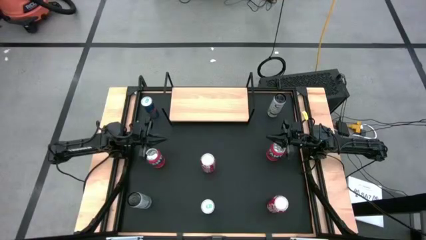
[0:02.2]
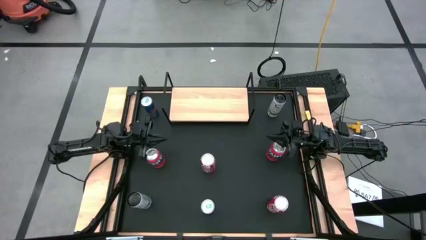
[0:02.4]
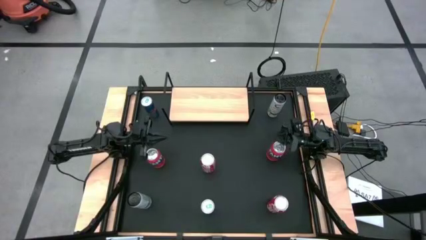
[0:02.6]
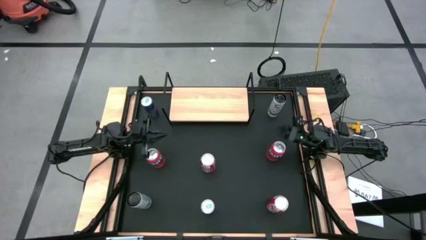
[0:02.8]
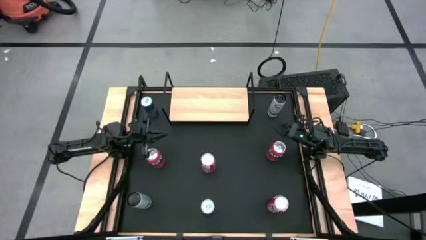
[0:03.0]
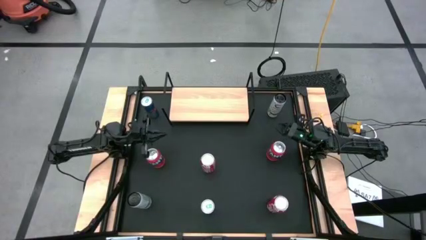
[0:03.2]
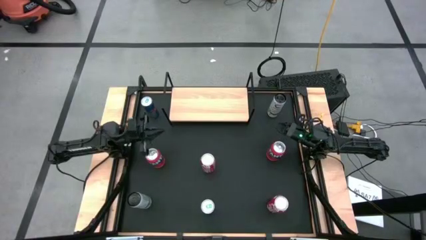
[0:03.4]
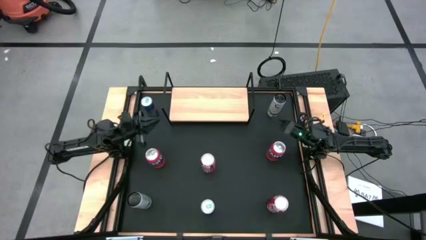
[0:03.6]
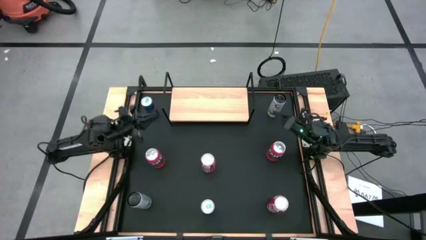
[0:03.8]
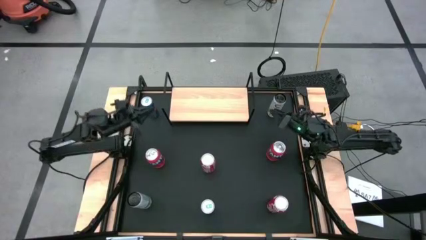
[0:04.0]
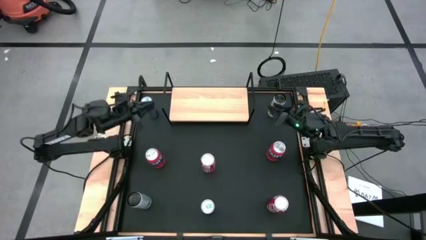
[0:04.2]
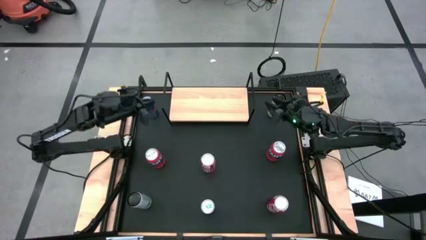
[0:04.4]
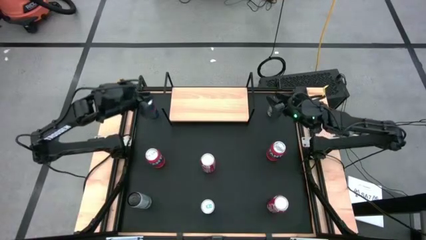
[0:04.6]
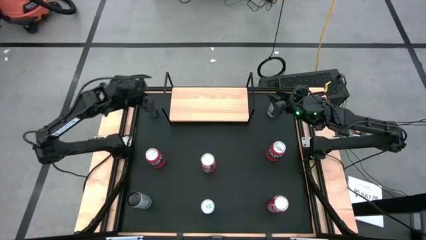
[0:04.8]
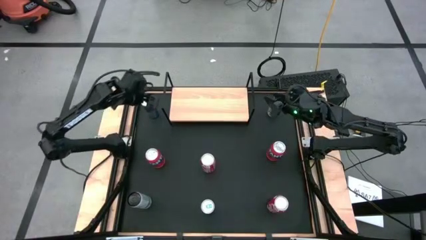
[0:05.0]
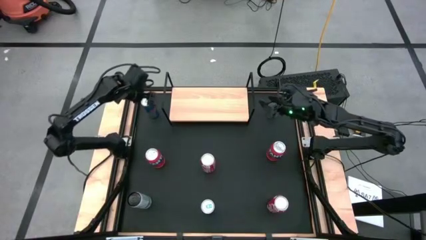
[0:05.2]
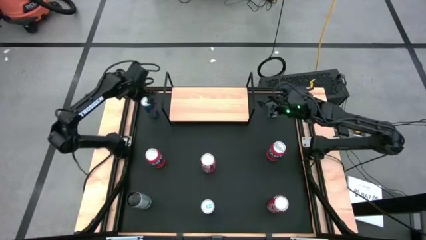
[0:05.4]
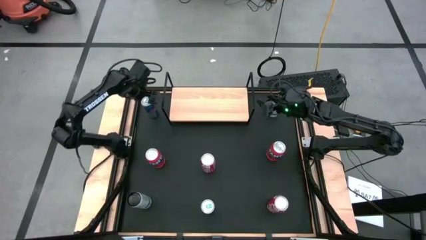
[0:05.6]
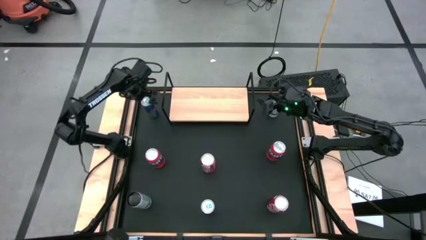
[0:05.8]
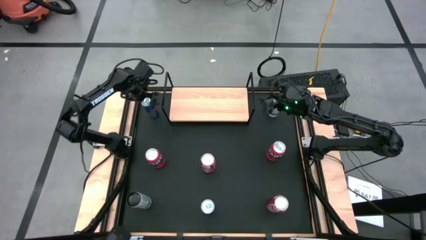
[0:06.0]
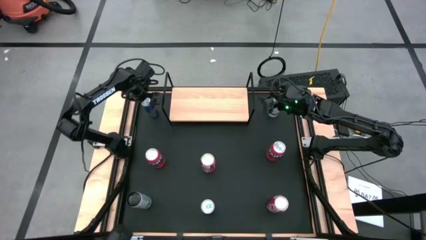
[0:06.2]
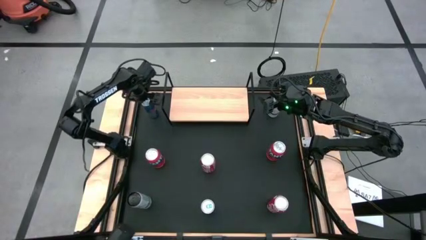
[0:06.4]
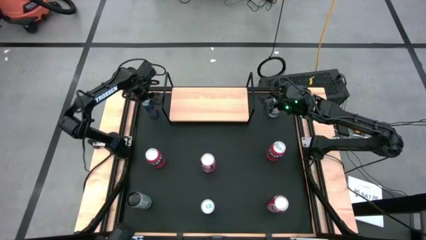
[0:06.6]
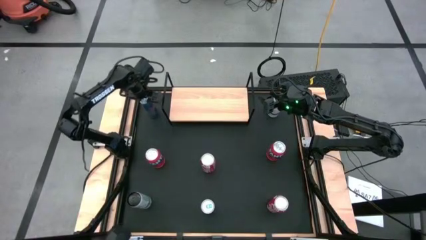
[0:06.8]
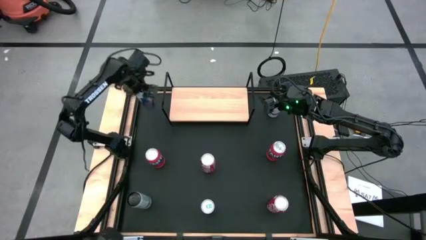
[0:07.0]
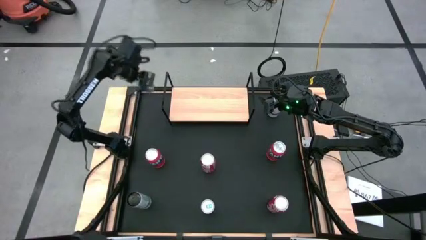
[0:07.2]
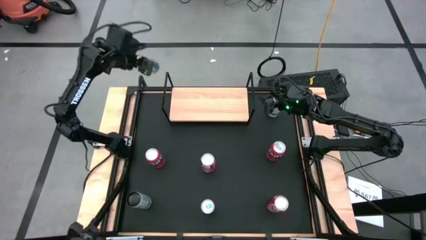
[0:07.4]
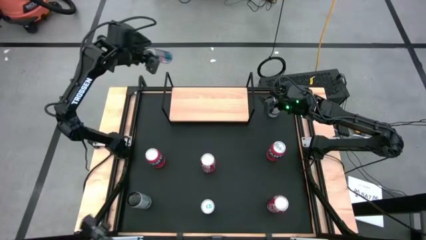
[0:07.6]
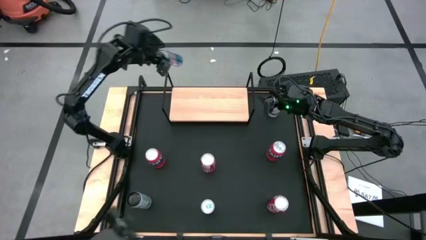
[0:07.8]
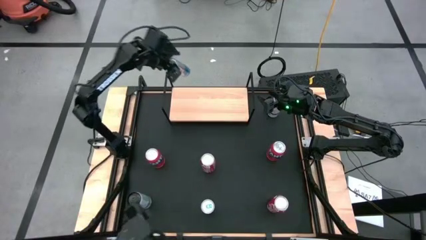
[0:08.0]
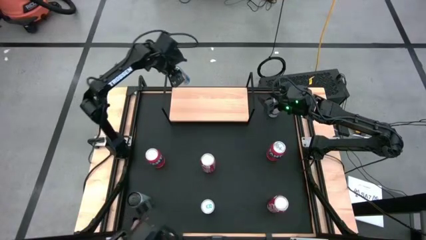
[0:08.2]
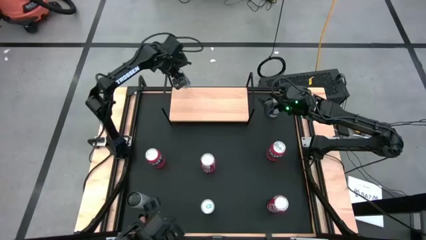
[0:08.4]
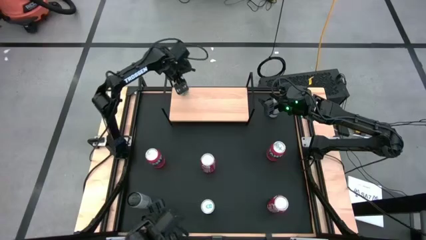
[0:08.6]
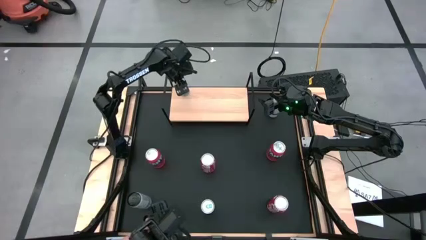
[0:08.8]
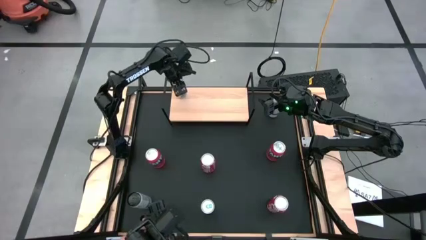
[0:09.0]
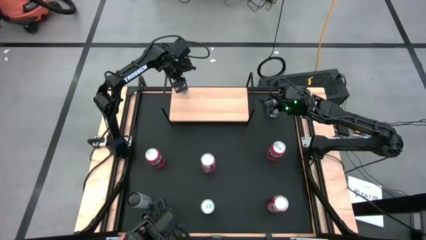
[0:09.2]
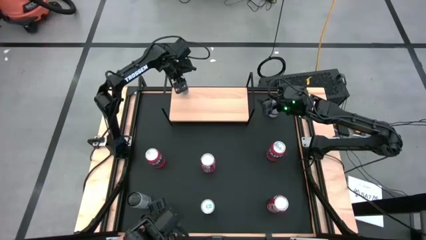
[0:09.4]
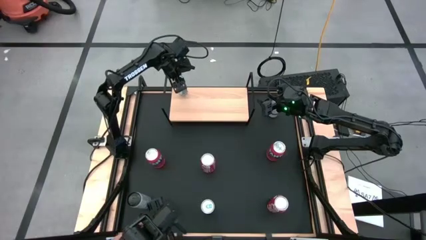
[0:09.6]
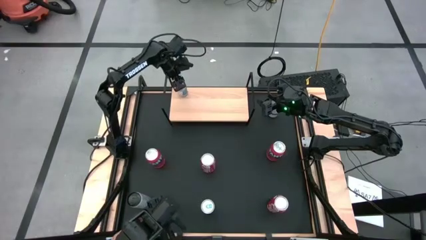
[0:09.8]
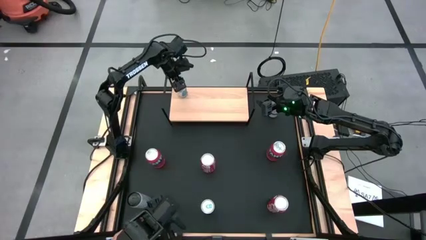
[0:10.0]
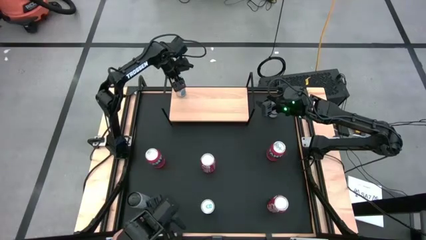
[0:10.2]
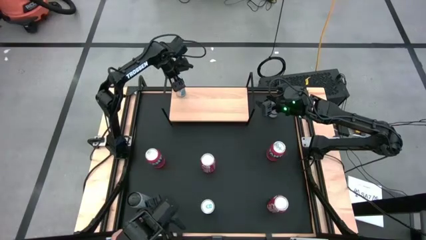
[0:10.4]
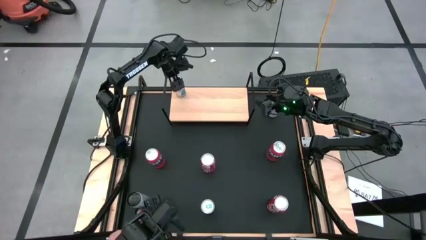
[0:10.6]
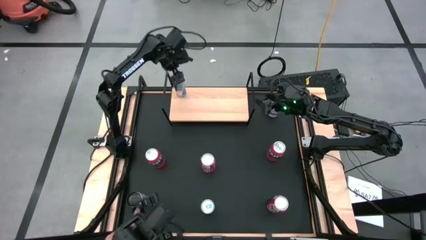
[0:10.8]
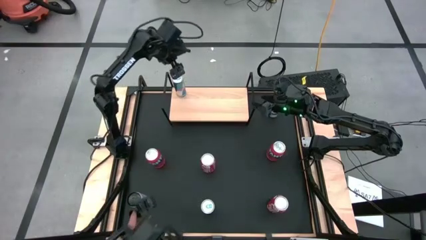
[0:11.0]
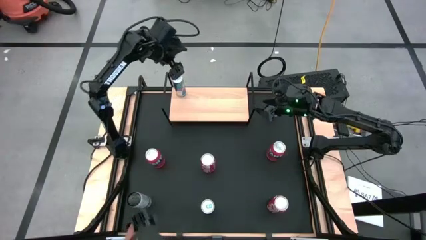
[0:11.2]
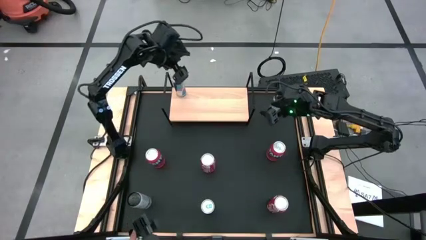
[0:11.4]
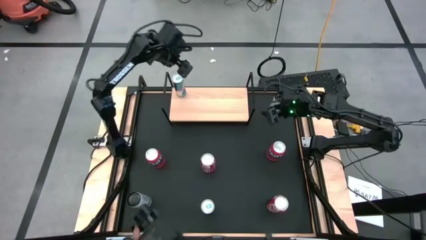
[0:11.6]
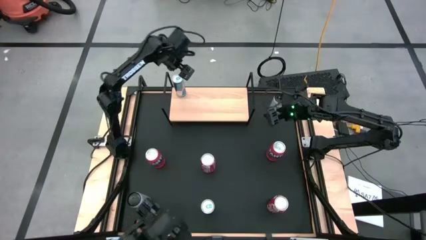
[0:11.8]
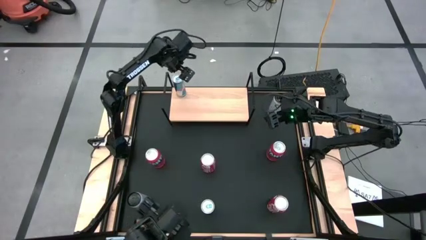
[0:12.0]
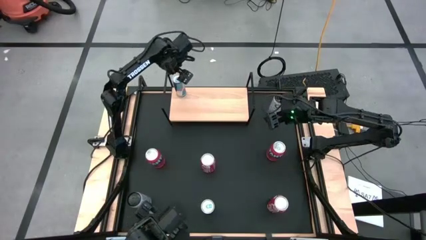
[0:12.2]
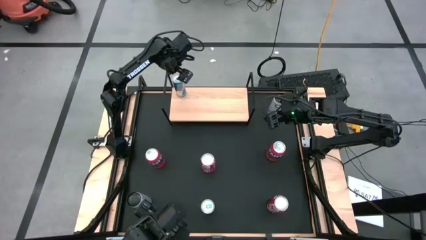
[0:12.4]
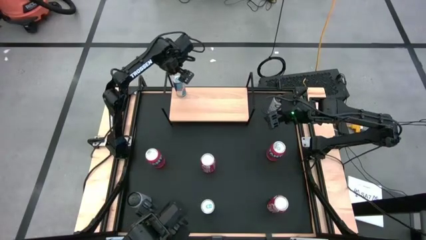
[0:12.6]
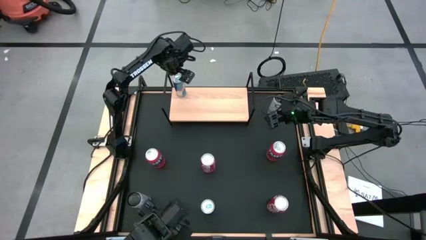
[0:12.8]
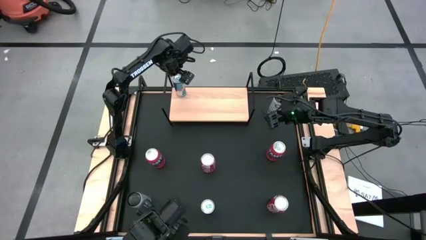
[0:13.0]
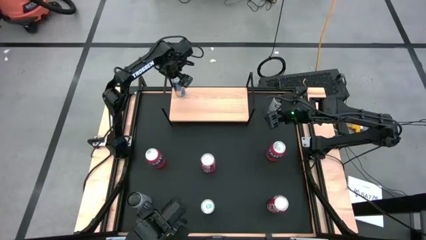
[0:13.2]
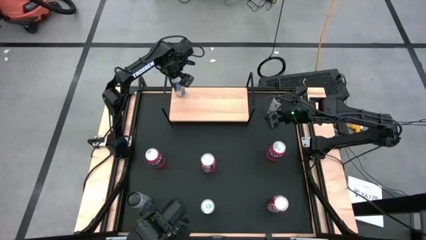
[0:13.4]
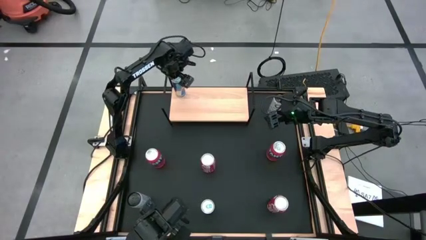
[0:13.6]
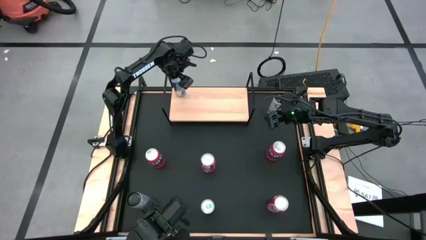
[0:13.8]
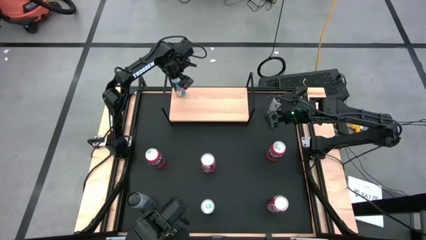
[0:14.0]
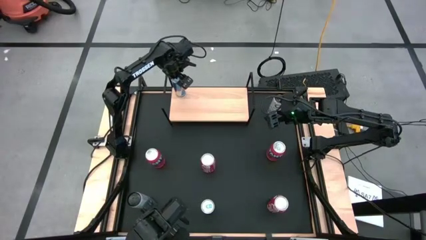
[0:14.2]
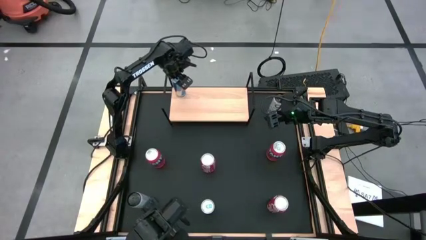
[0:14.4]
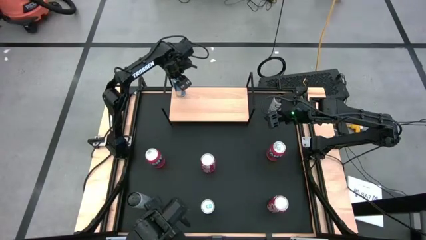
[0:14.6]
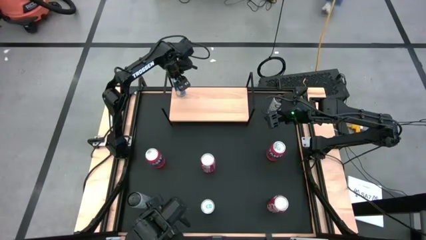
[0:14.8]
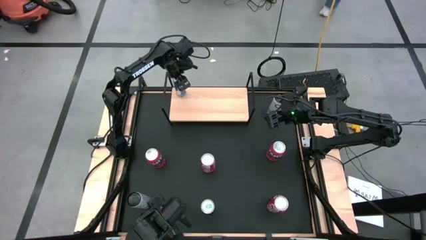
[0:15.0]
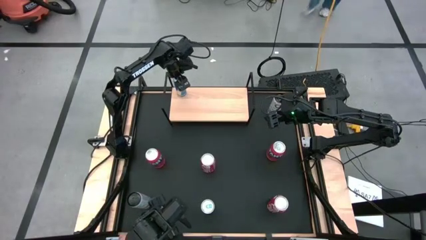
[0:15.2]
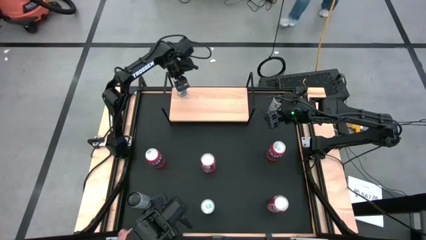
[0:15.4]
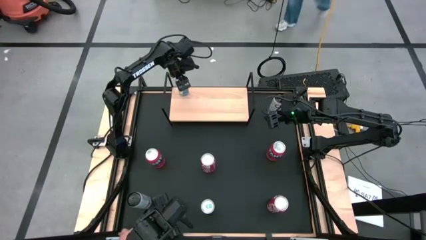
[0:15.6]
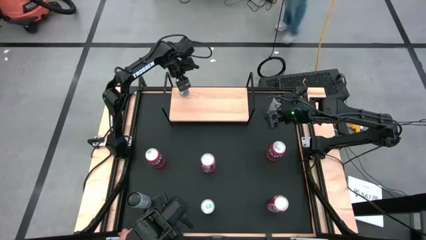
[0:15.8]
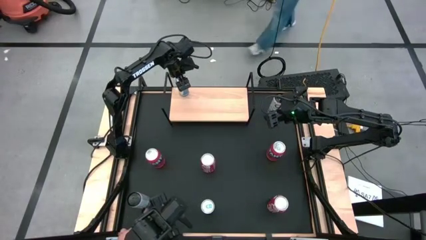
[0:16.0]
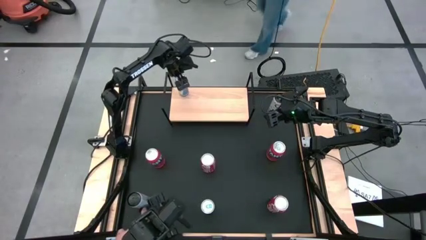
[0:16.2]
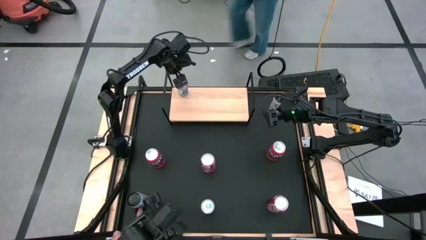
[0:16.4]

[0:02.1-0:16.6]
Task: Place canned beverage on shelf
Put the top blue soda can on the shelf
